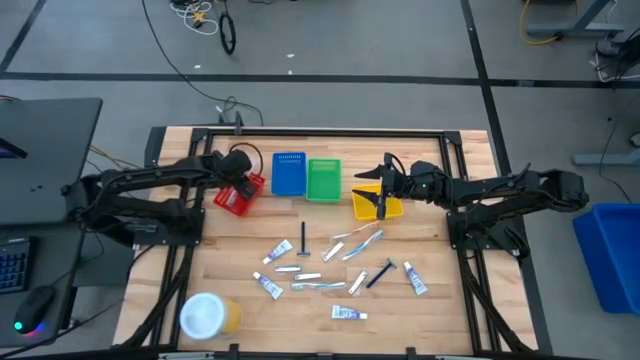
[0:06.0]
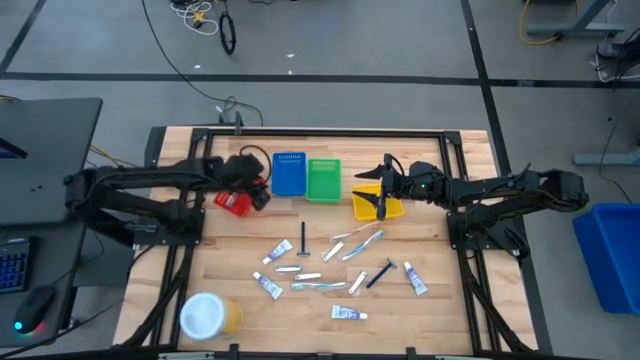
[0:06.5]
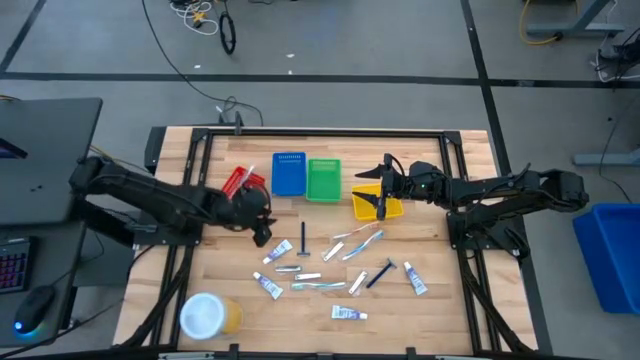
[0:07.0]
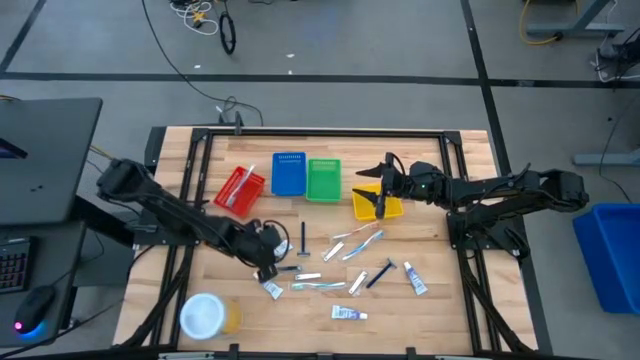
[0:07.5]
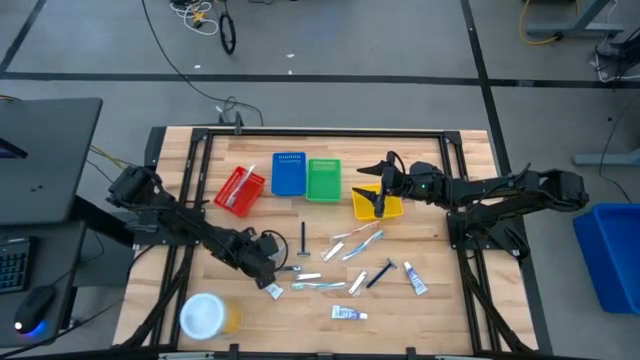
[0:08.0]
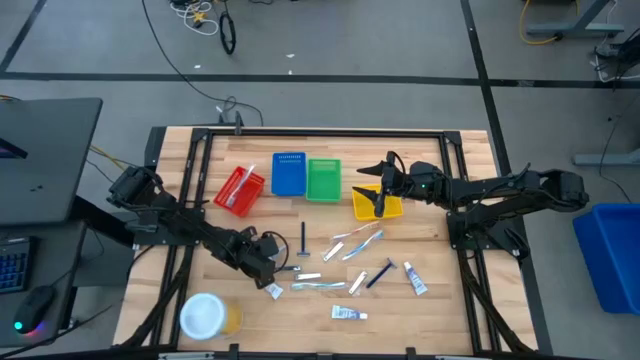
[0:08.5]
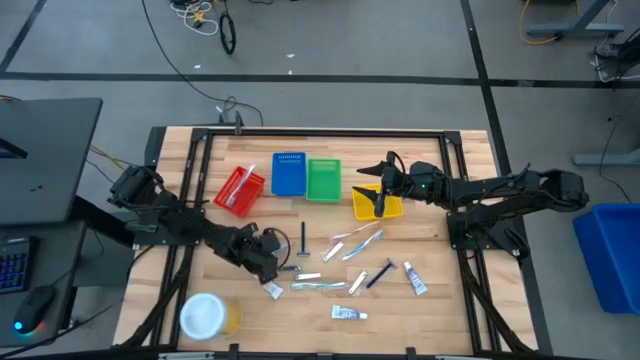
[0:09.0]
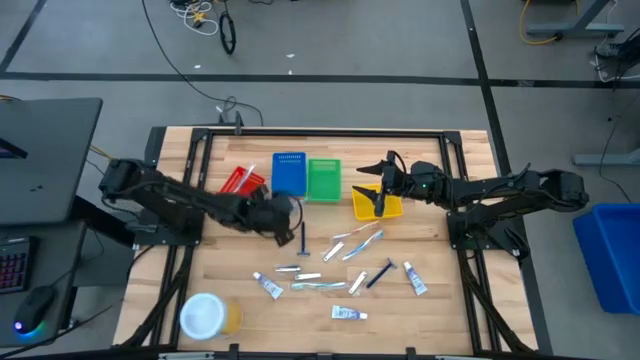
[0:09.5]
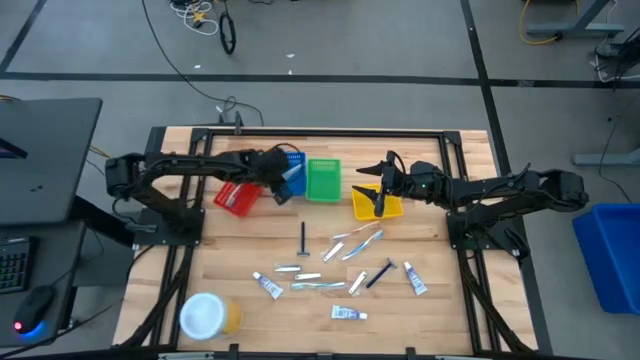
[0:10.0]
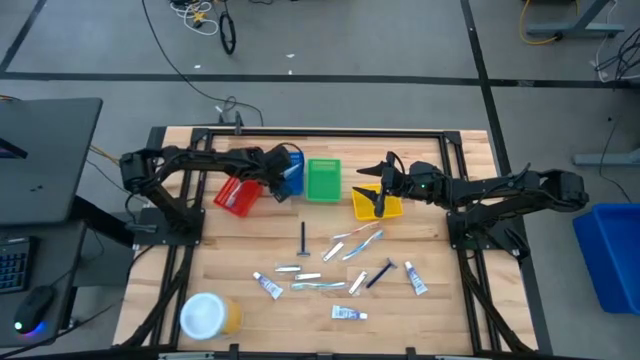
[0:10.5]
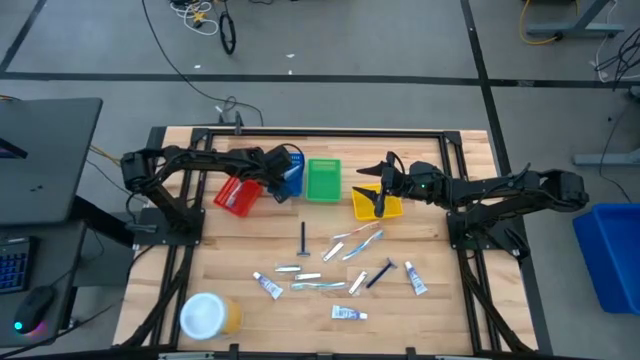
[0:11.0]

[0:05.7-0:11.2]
Task: Pick & Place Travel size toiletries
Put the white toothpaste into the blue bin

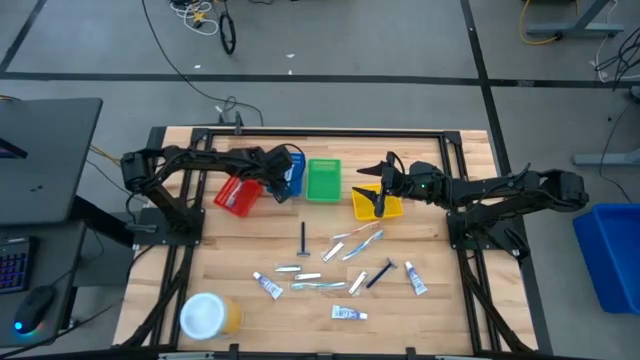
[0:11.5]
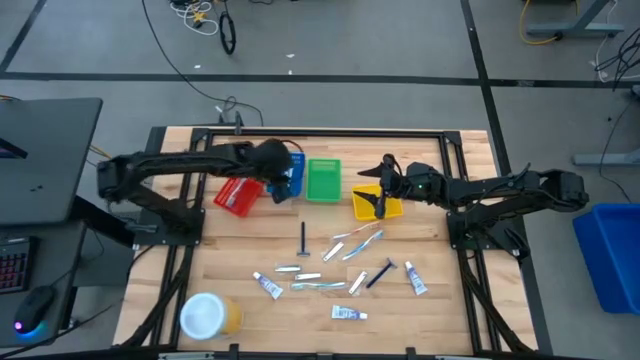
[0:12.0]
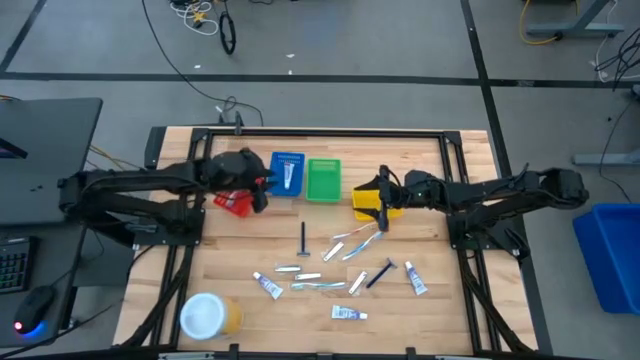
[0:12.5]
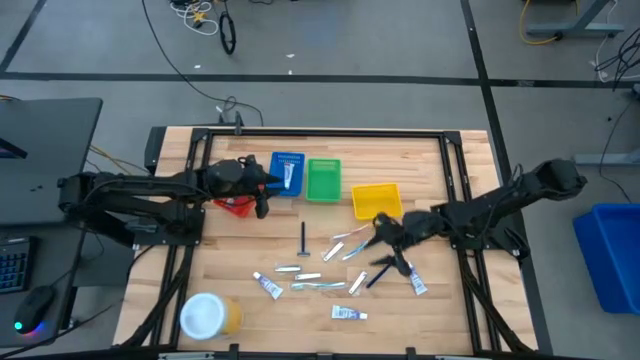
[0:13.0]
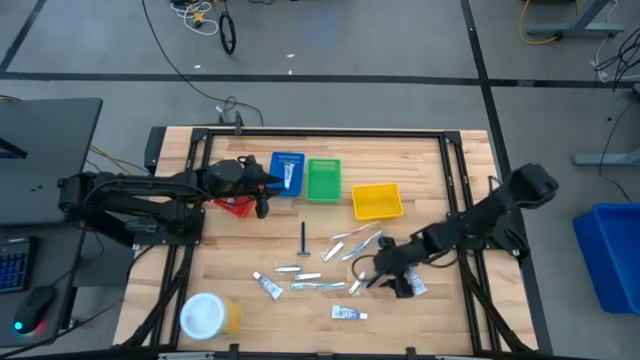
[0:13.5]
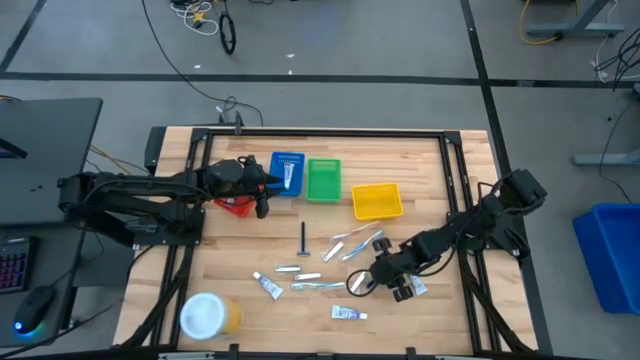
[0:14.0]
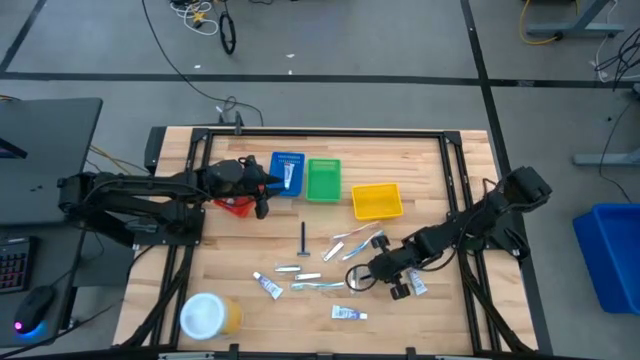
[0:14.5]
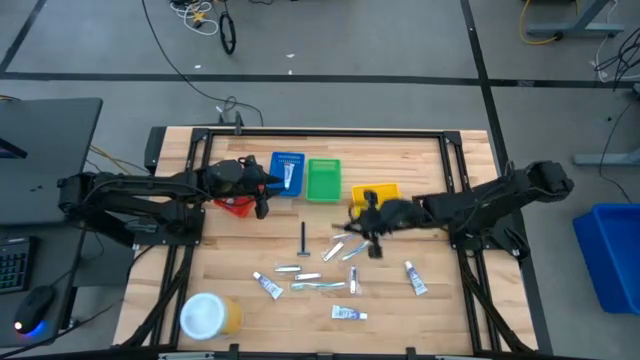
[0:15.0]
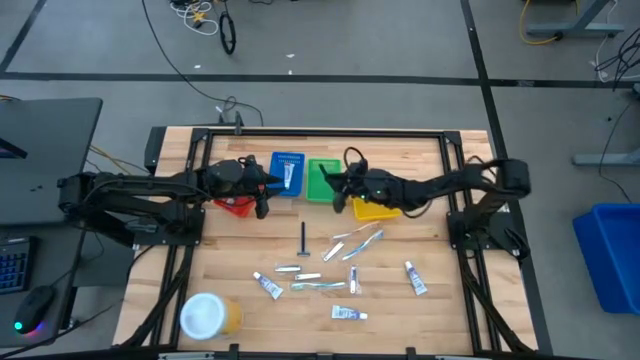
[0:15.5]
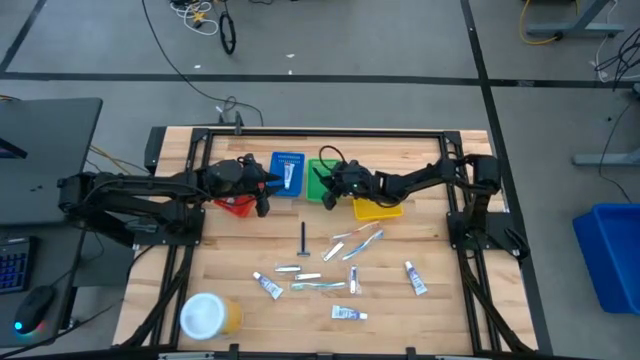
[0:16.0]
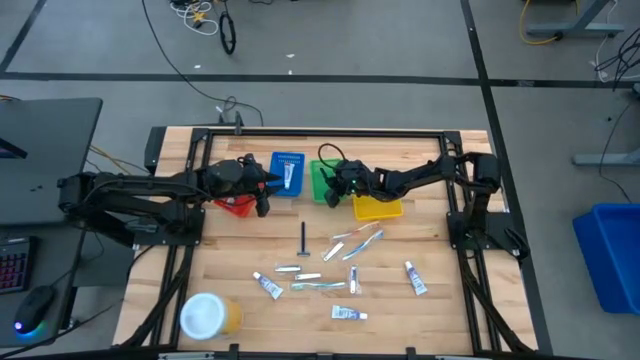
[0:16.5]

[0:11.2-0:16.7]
Put the blue razor into the green bin

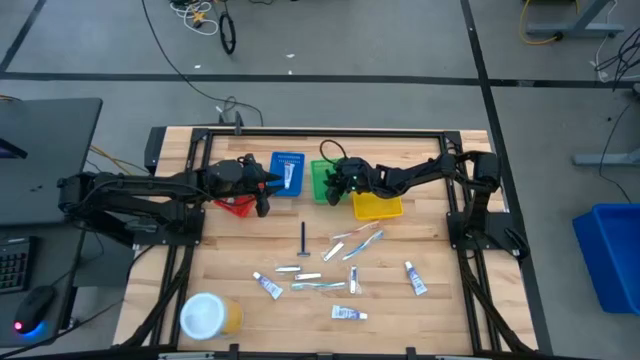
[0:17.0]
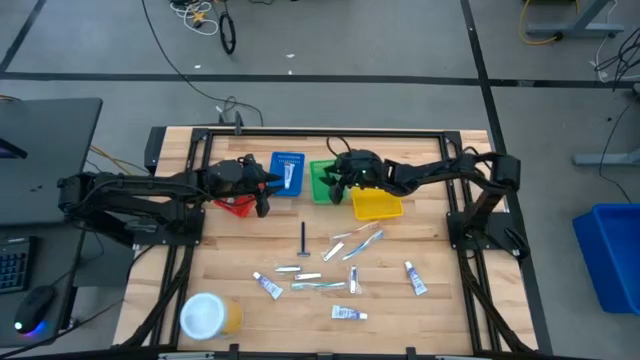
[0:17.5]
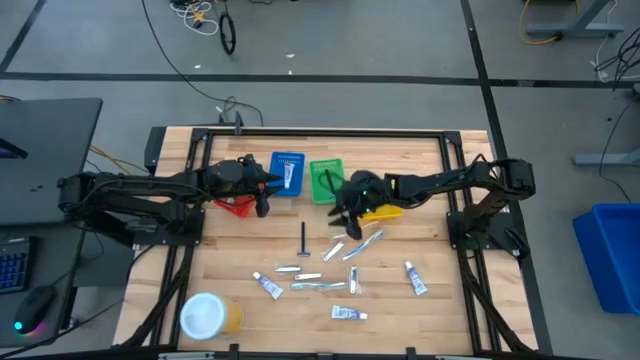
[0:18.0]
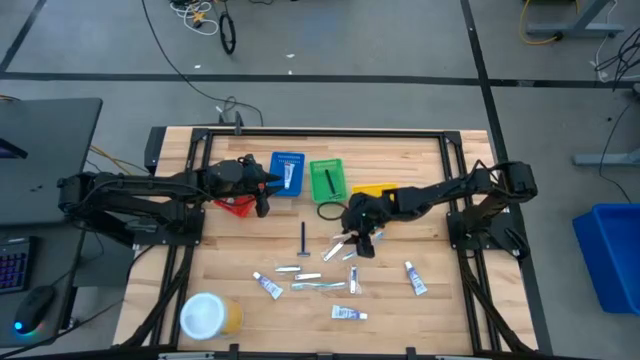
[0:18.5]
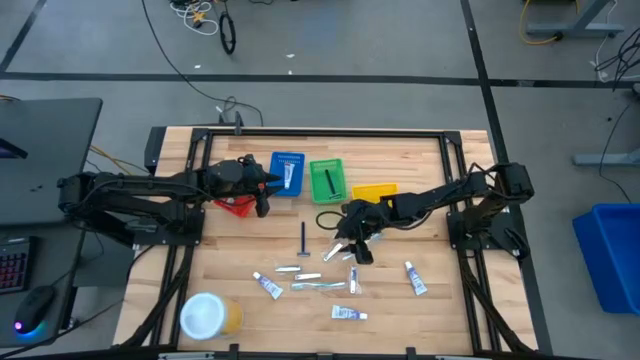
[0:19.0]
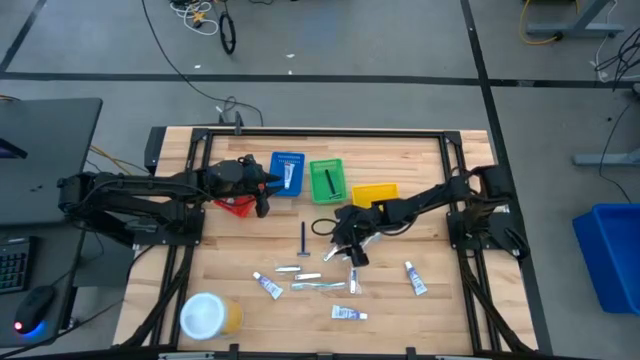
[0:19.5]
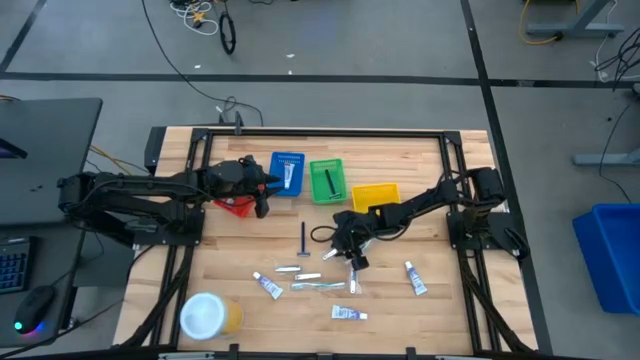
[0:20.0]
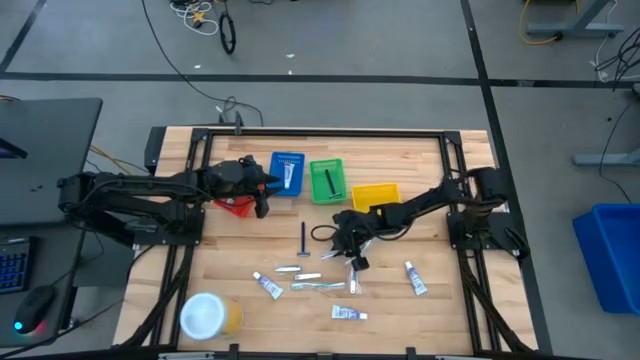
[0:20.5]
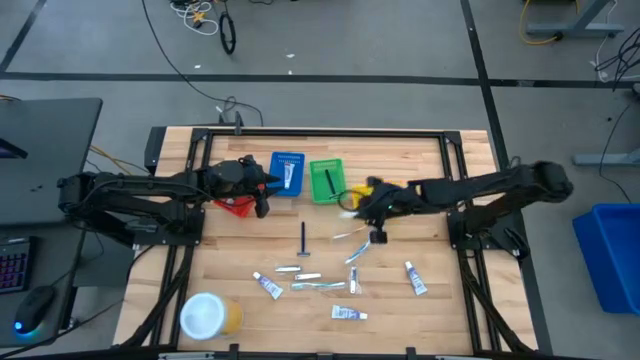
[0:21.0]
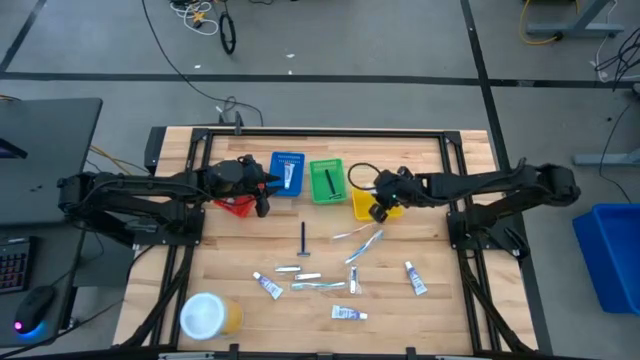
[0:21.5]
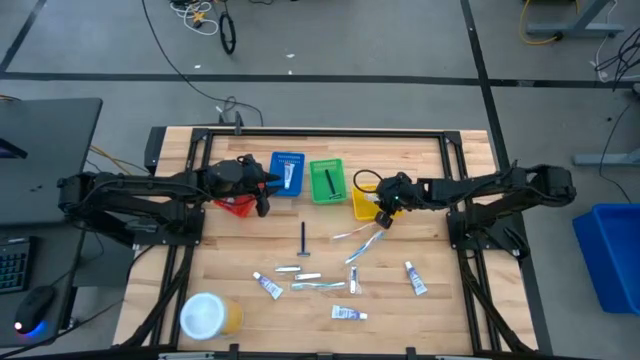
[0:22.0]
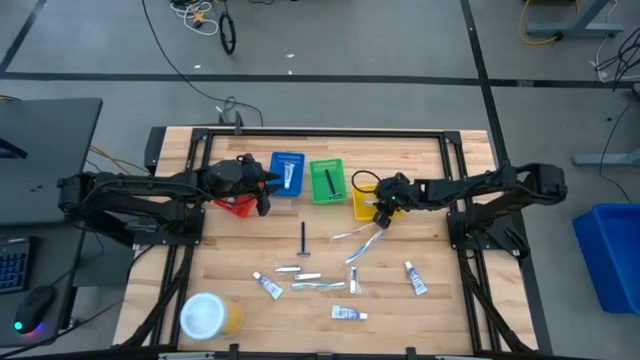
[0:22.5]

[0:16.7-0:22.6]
Put the silver nail cutter into the yellow bin

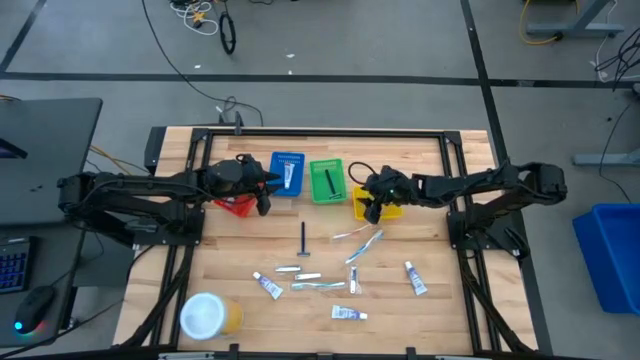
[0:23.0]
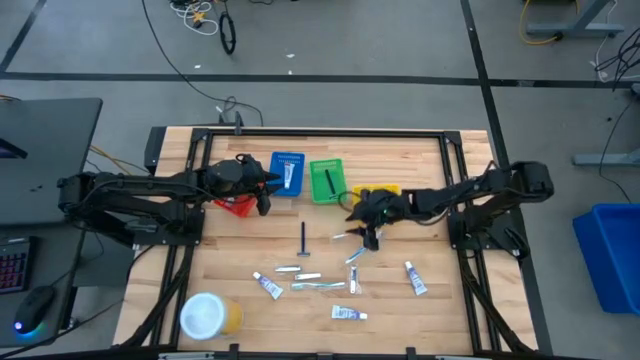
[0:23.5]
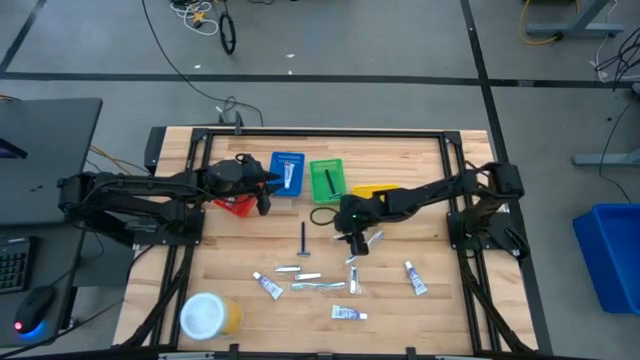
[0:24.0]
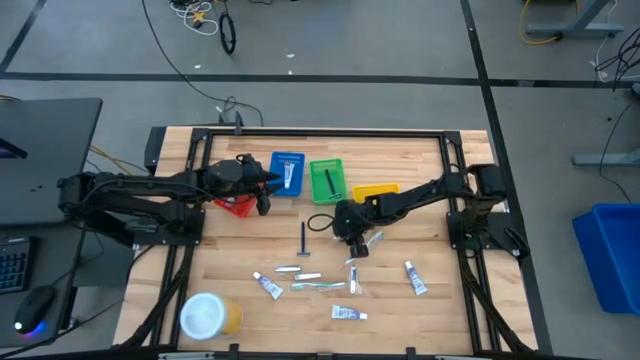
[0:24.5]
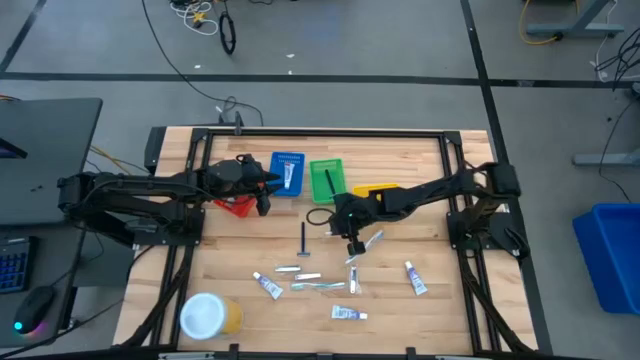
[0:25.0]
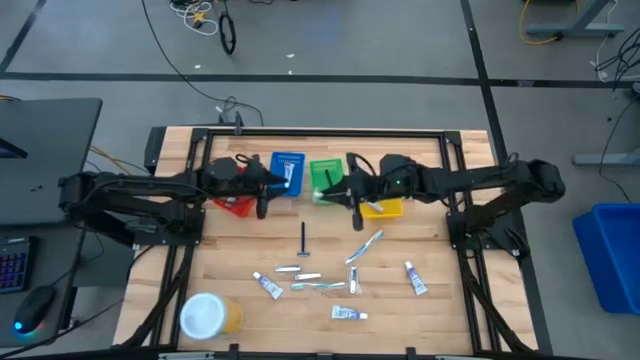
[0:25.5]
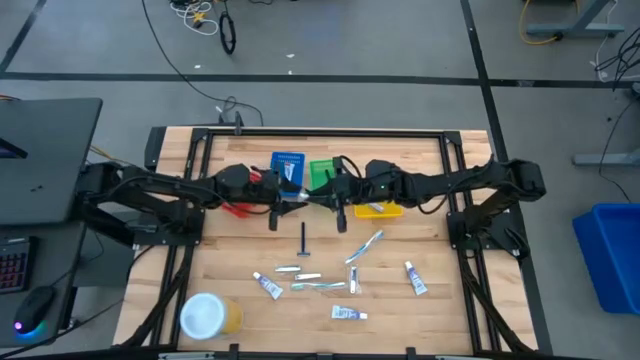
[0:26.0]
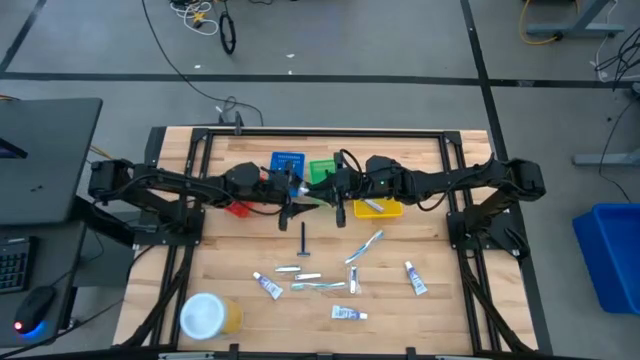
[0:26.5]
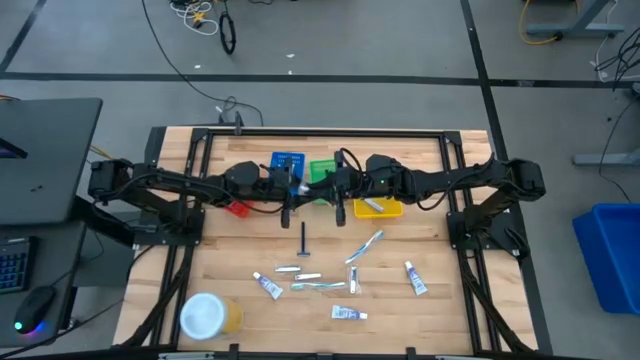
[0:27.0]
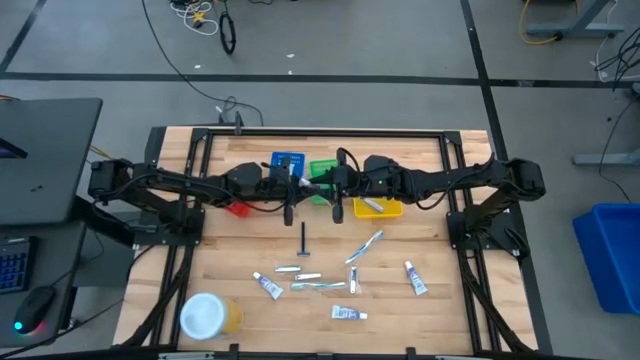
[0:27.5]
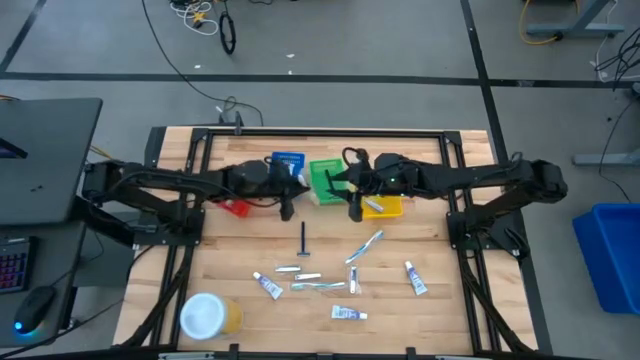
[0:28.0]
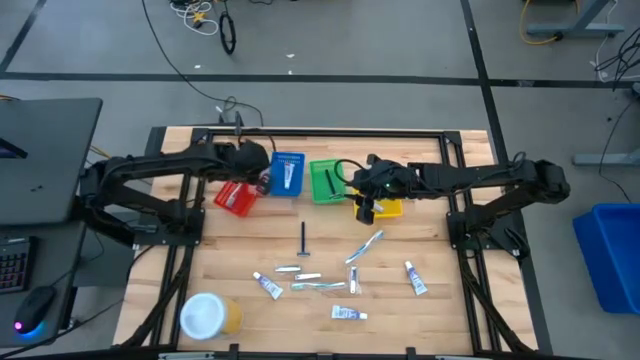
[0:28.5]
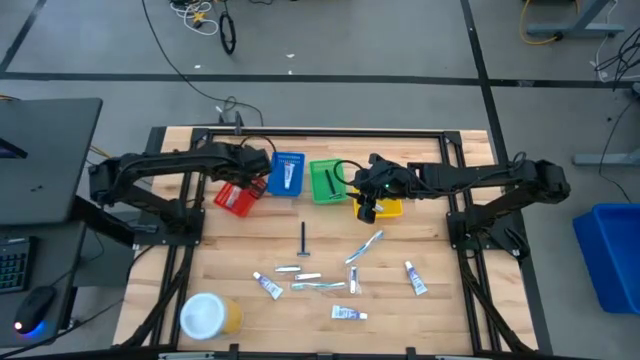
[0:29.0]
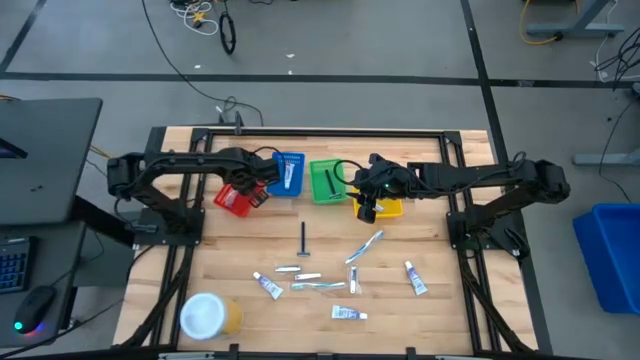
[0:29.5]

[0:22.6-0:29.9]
Put the orange toothbrush into the red bin
